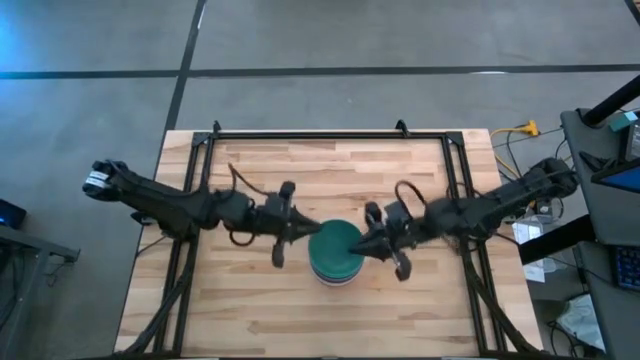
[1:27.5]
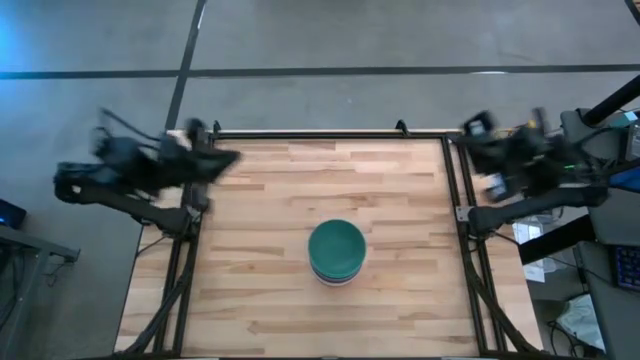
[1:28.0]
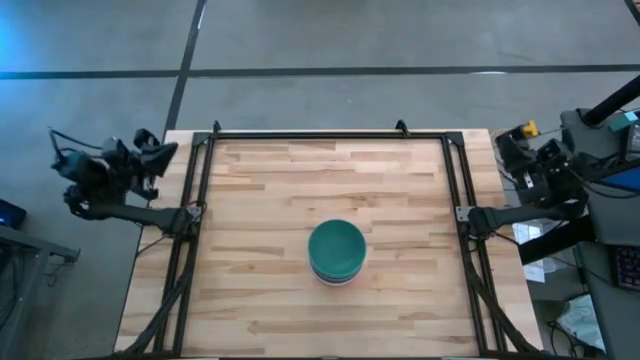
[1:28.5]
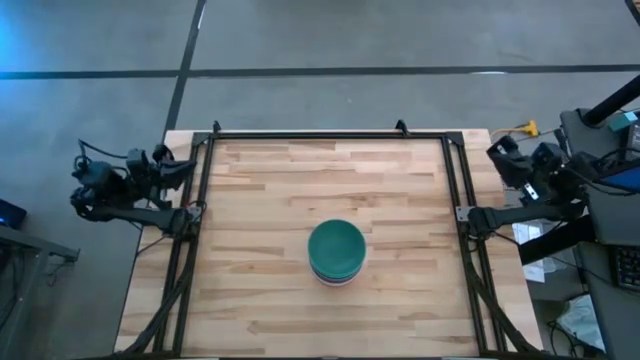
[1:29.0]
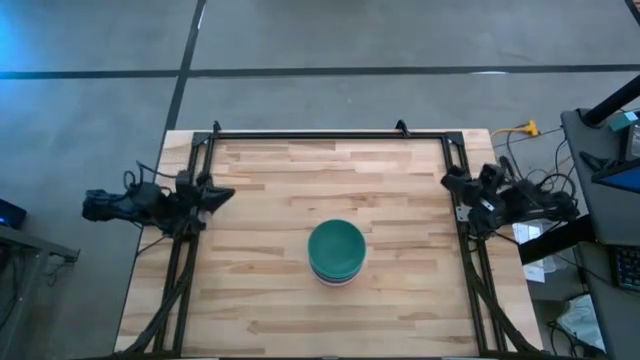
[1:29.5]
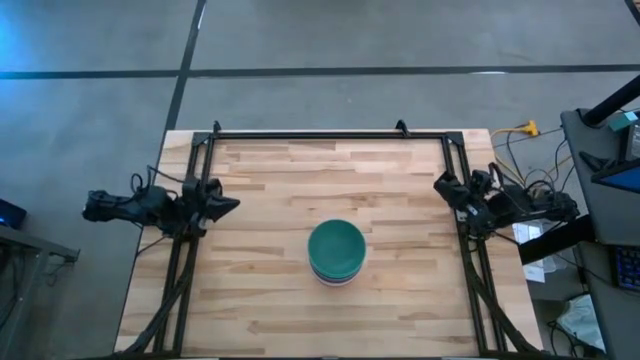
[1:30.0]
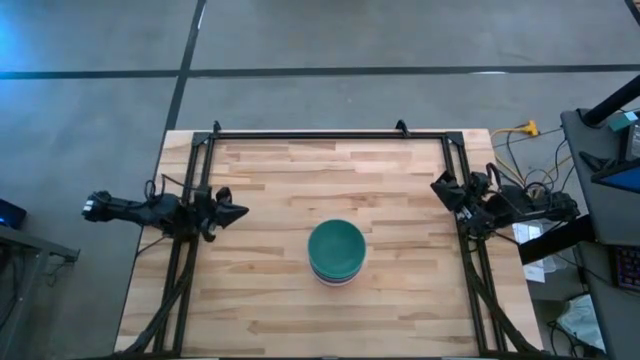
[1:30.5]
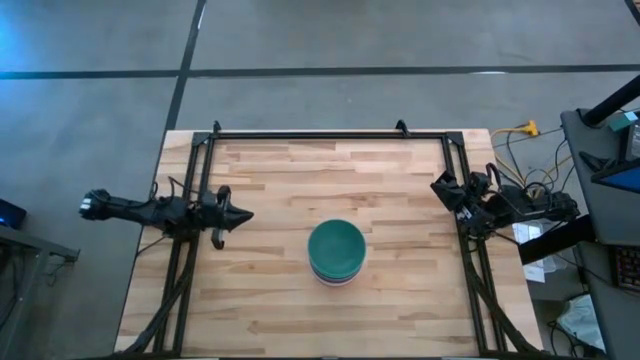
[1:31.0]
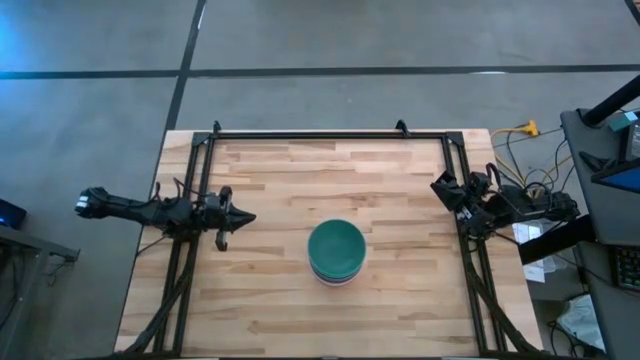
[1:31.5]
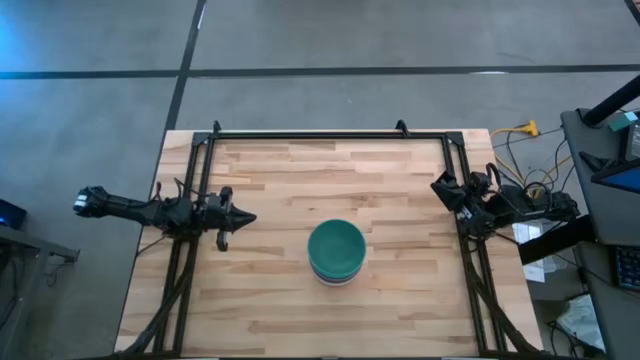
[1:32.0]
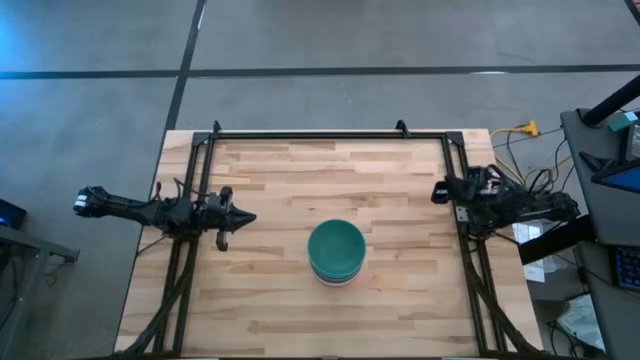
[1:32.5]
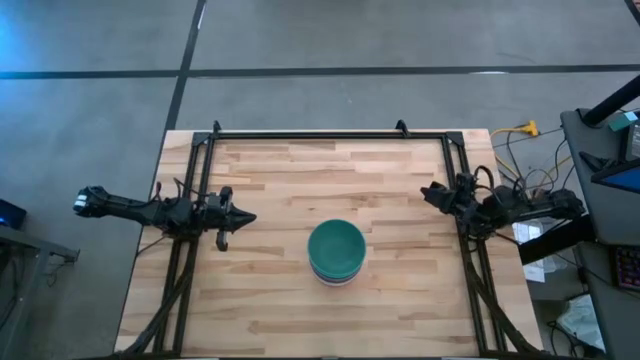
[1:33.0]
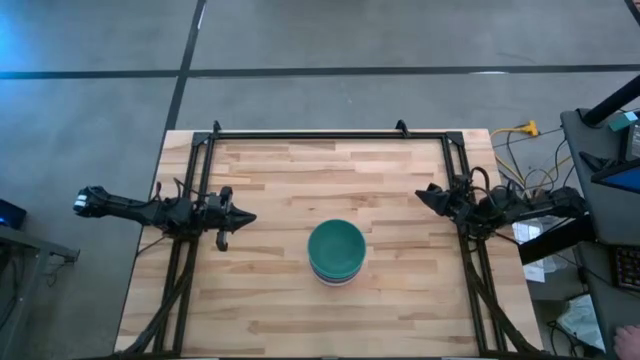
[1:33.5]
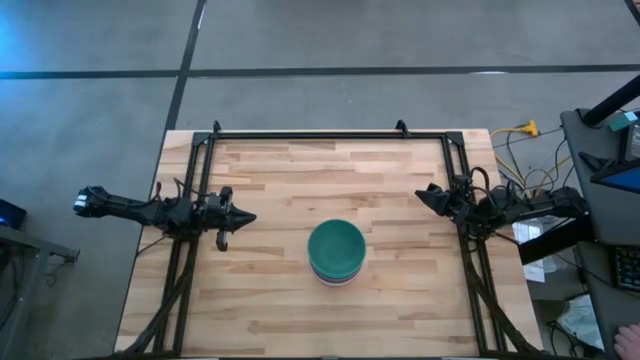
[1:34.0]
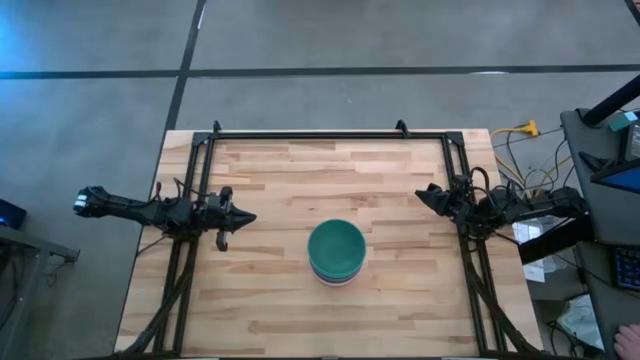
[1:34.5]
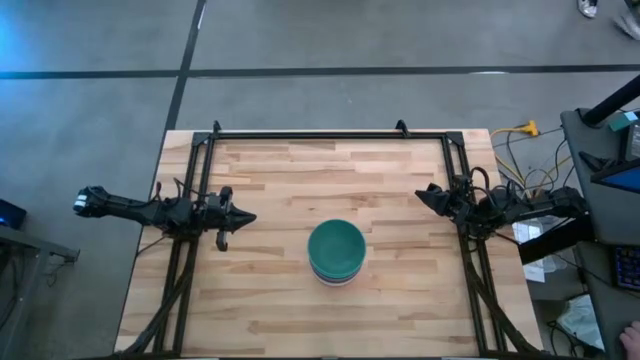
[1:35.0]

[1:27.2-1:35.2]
Task: Nest bowls inside each other
Return to Home Position

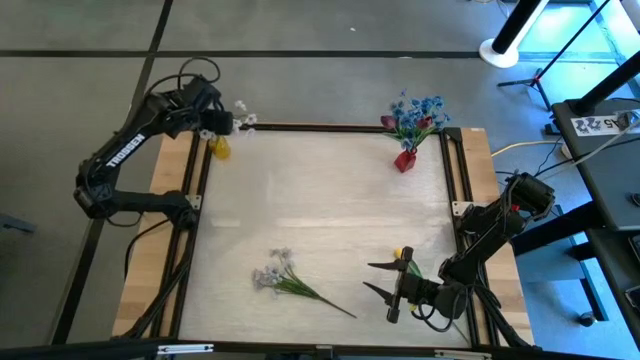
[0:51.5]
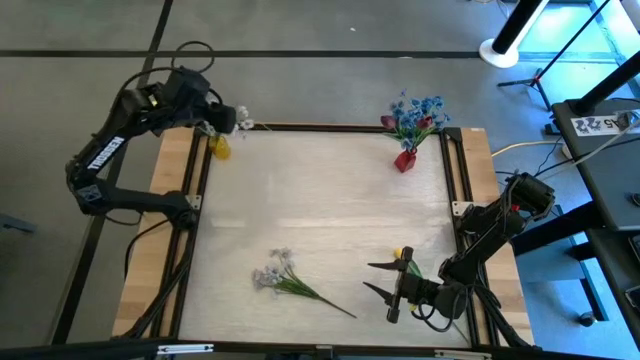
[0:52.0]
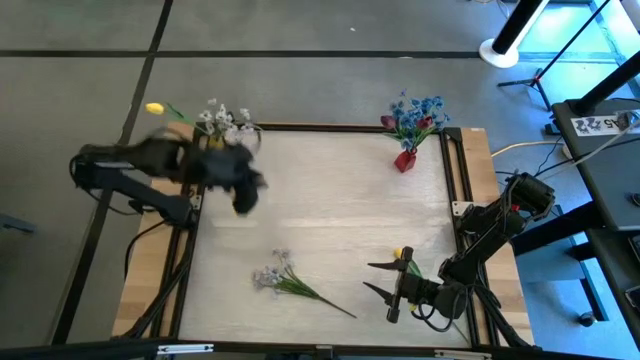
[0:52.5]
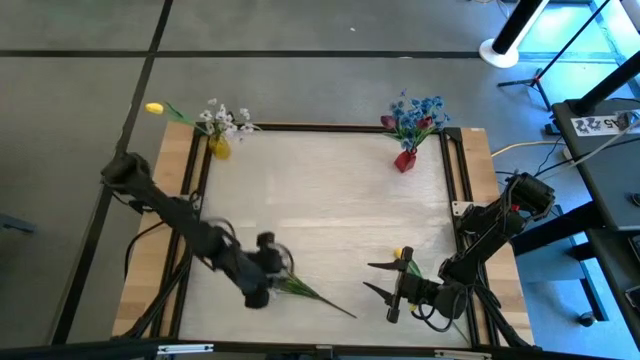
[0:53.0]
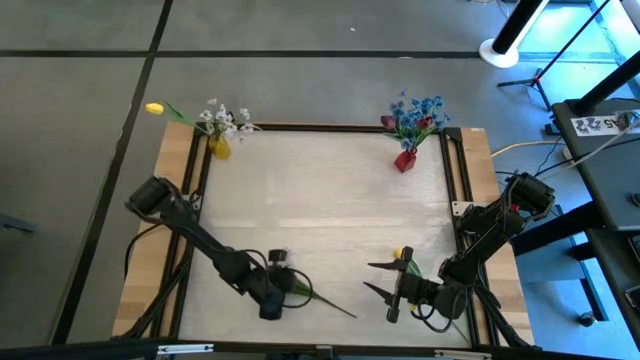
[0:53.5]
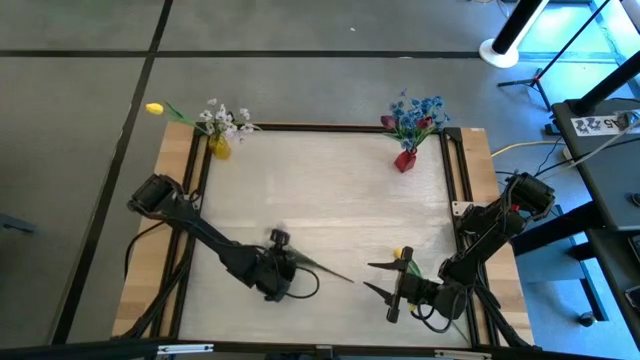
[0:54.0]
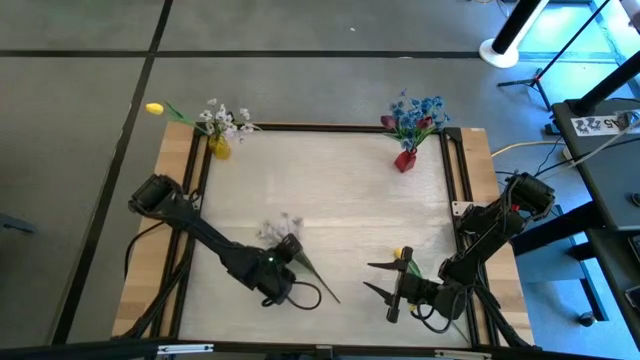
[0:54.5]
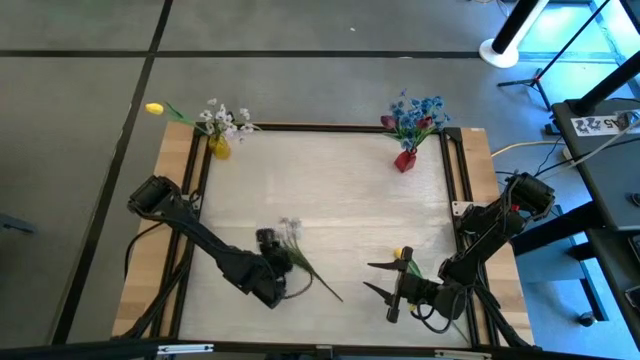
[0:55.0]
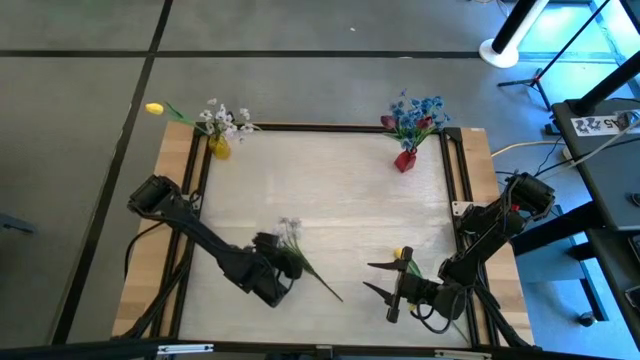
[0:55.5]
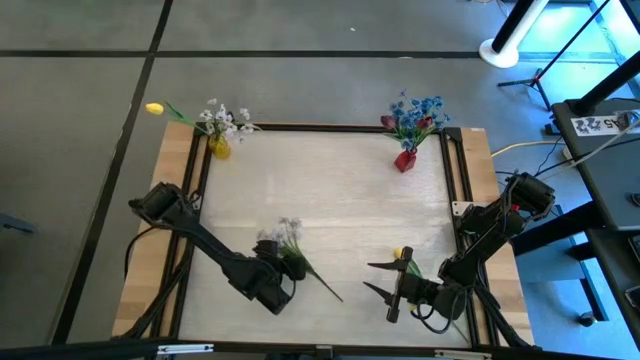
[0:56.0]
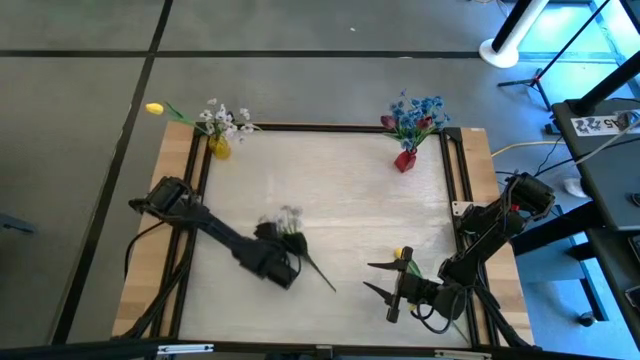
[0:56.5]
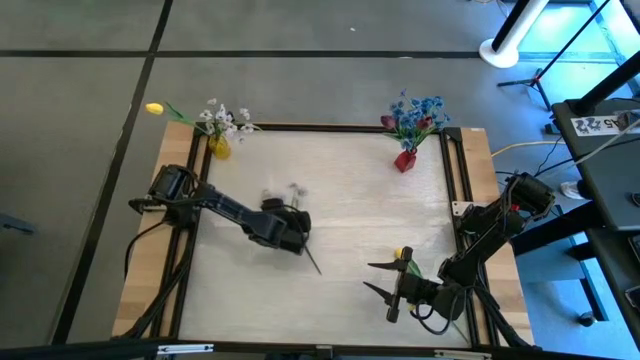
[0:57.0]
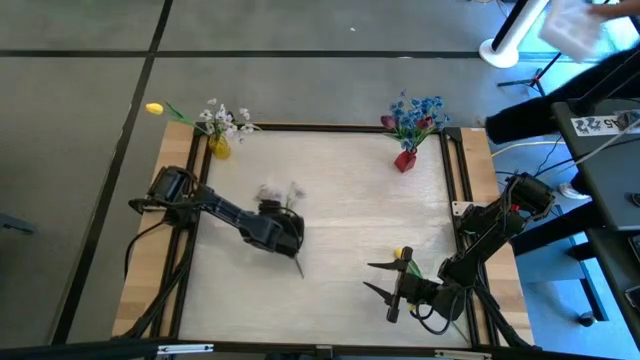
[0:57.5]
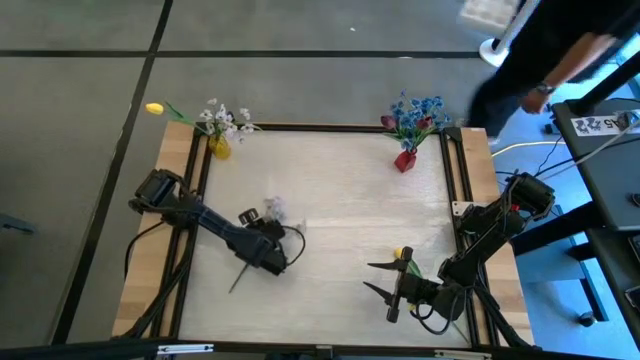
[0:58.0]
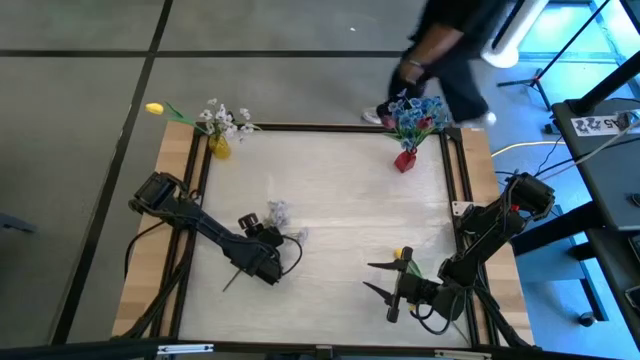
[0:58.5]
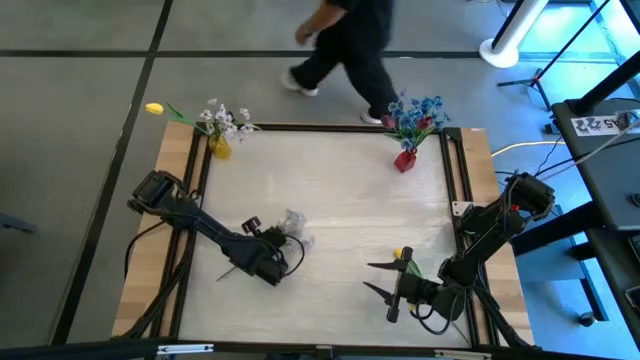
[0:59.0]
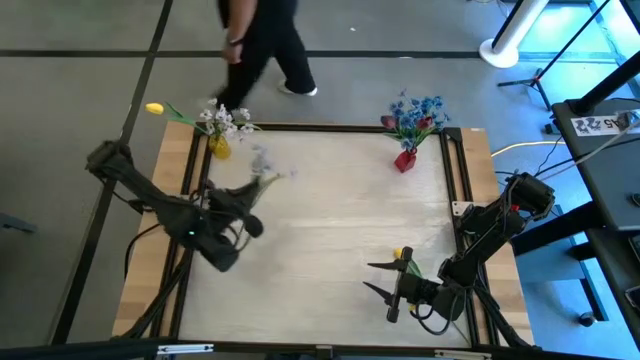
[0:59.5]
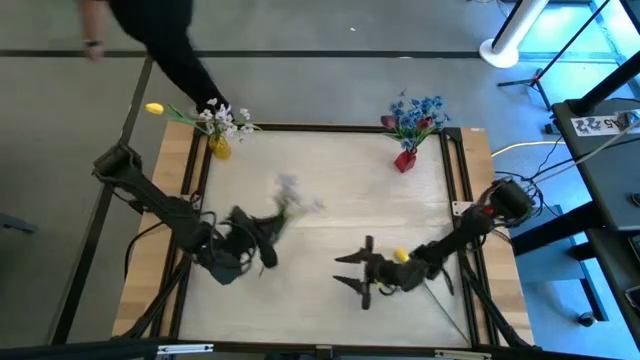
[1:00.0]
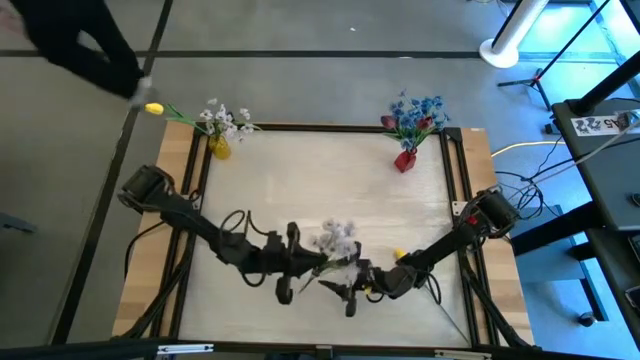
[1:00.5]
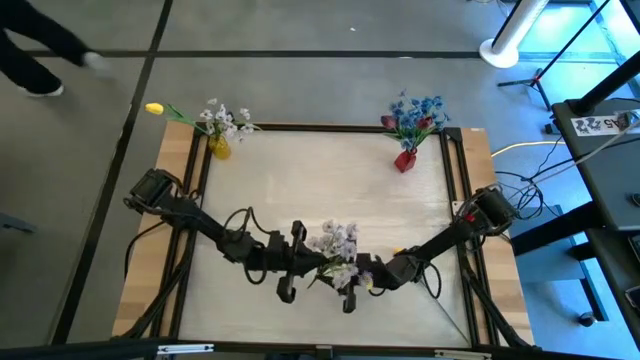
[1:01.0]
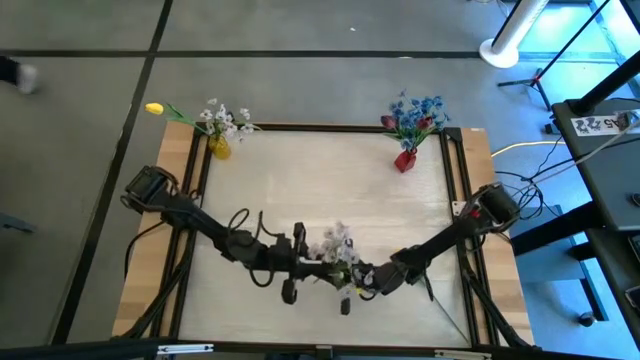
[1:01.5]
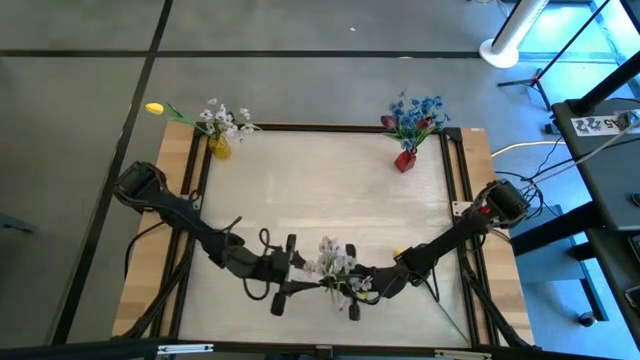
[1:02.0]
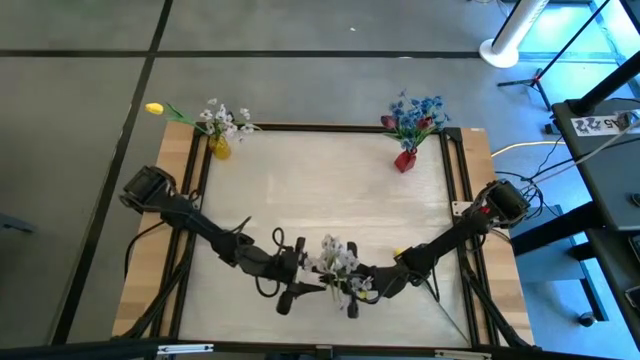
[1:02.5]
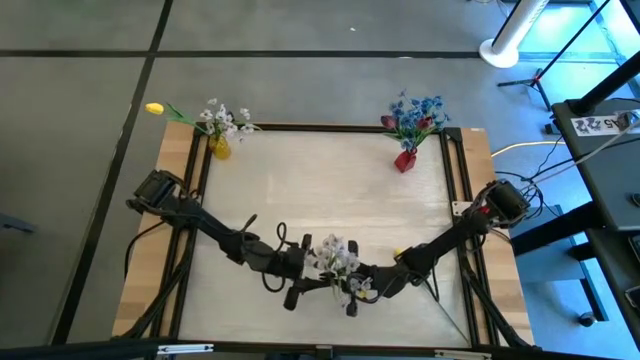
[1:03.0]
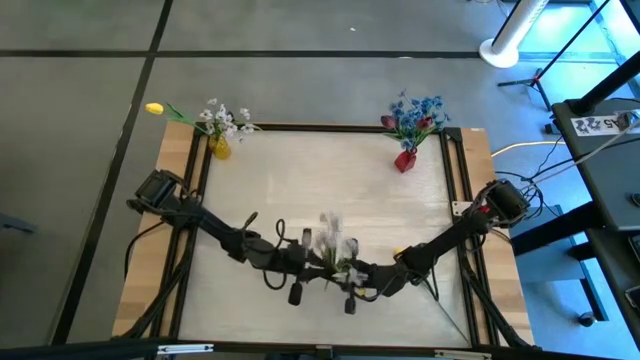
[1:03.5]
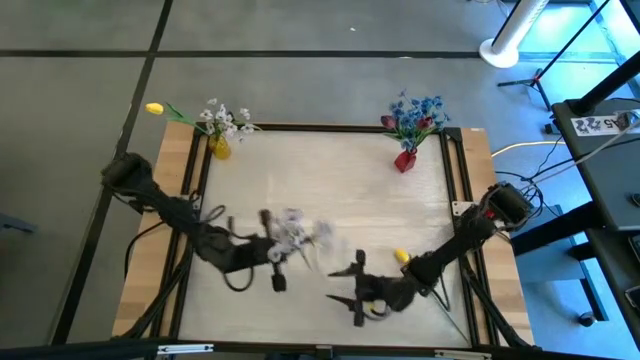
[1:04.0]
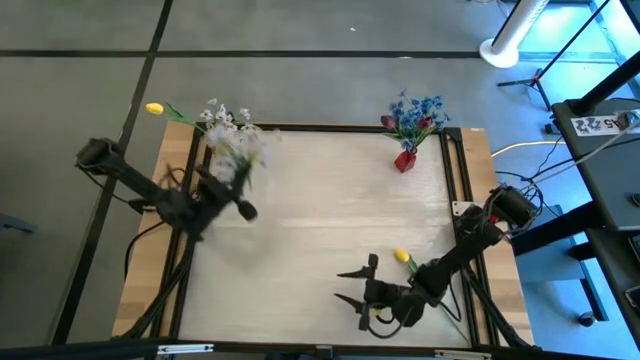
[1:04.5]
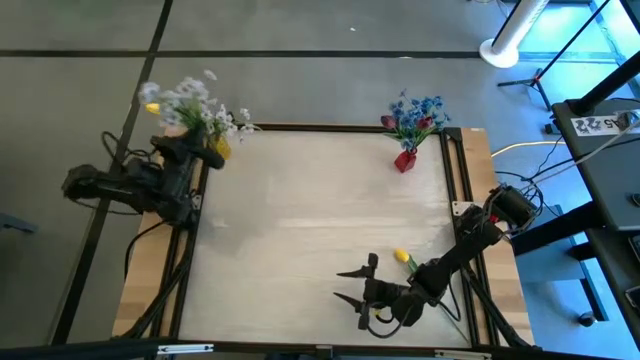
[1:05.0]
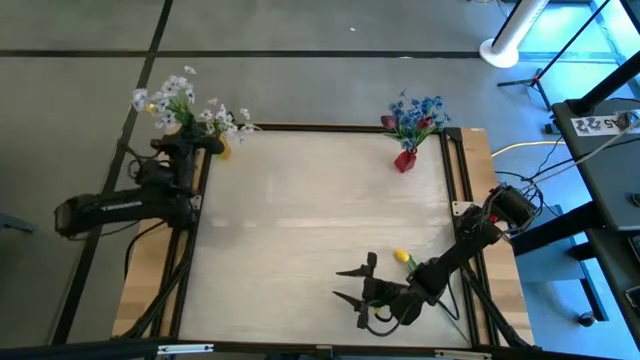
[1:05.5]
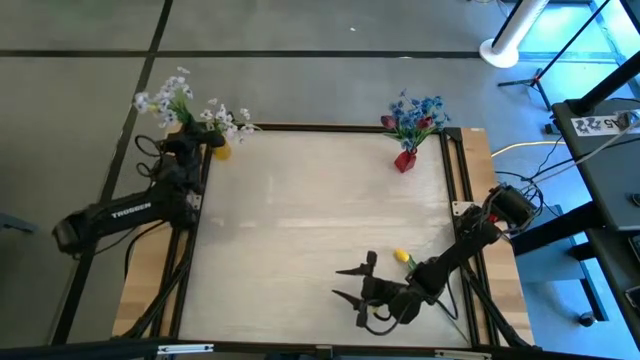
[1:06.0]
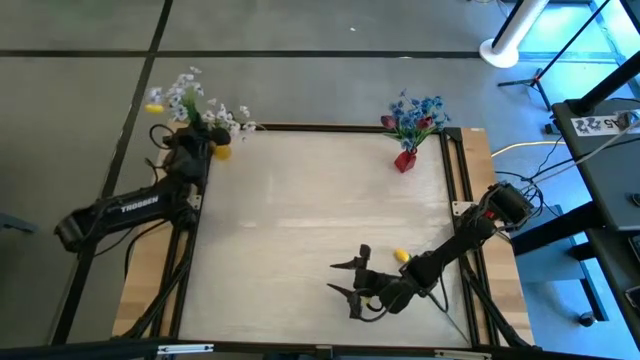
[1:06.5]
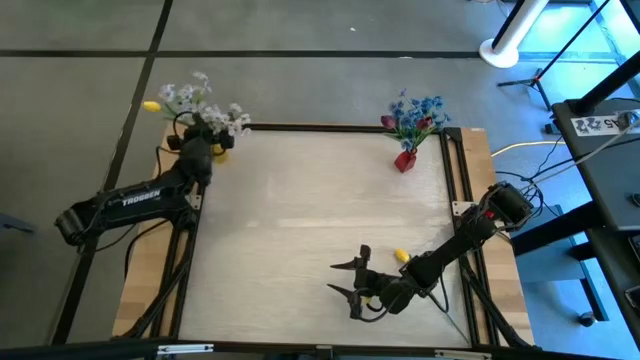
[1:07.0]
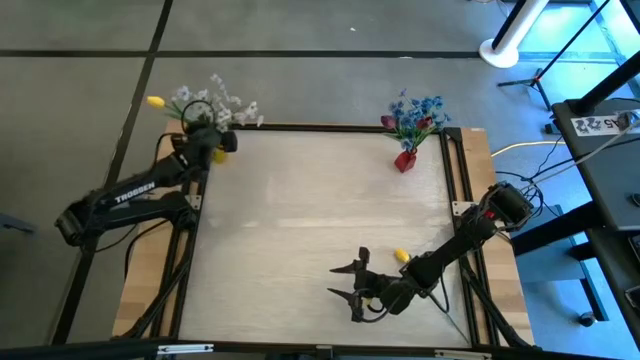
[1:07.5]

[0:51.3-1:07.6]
Task: Sort flowers into vase by color
Put the white flower into the yellow vase
